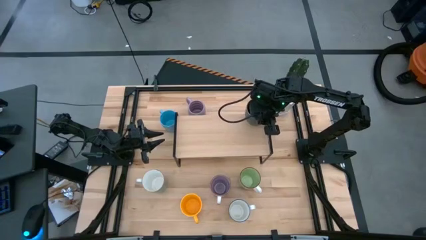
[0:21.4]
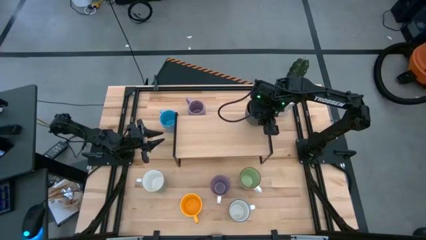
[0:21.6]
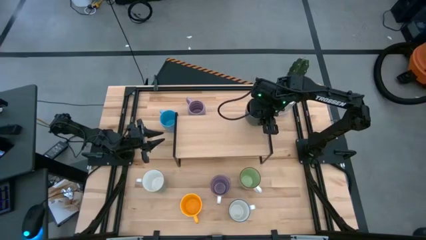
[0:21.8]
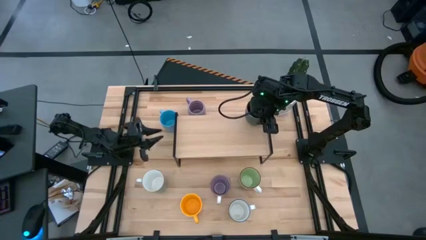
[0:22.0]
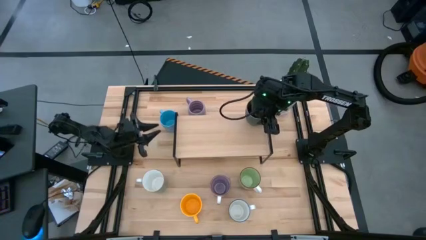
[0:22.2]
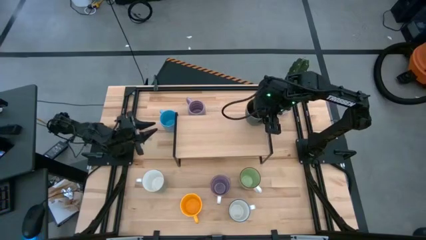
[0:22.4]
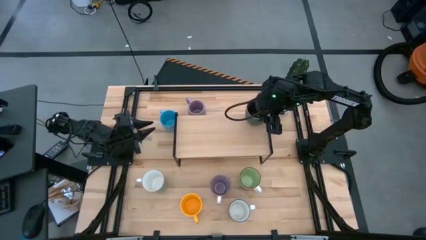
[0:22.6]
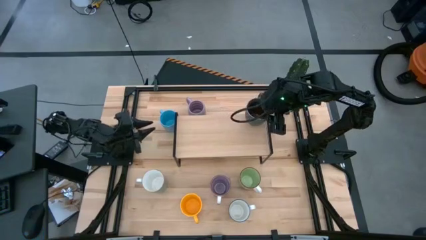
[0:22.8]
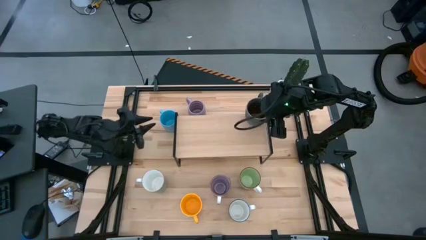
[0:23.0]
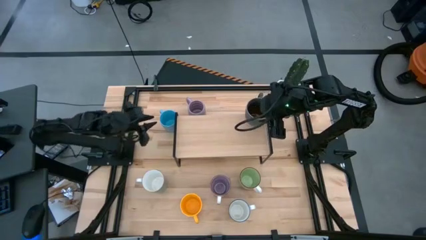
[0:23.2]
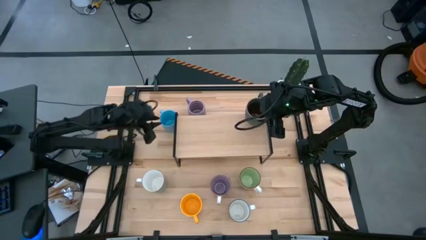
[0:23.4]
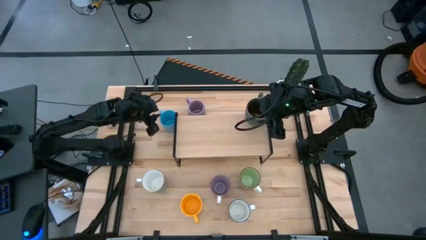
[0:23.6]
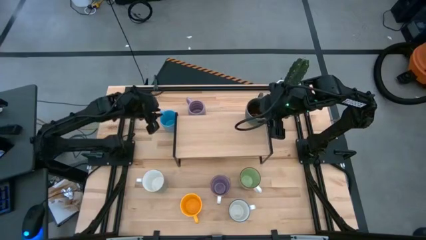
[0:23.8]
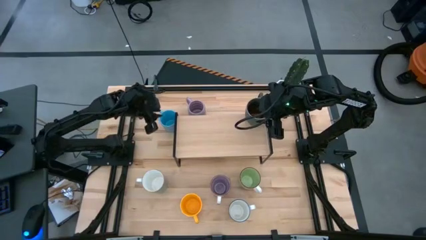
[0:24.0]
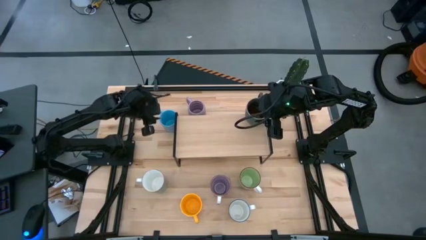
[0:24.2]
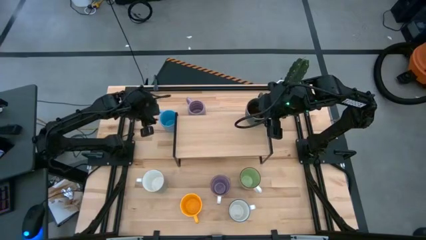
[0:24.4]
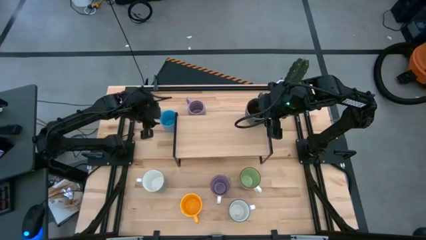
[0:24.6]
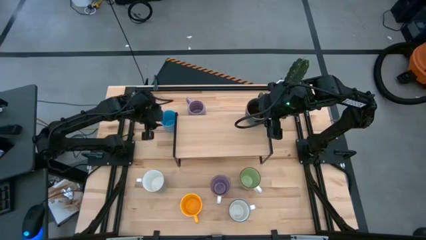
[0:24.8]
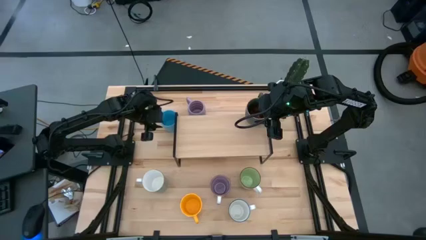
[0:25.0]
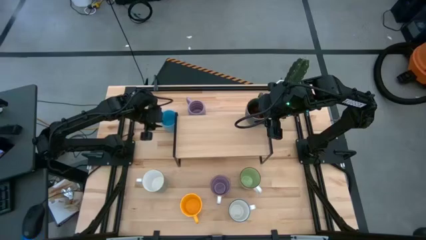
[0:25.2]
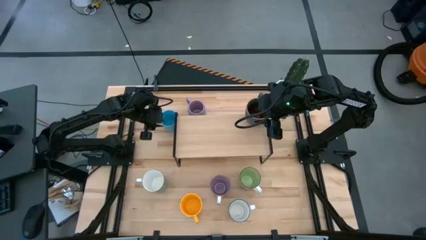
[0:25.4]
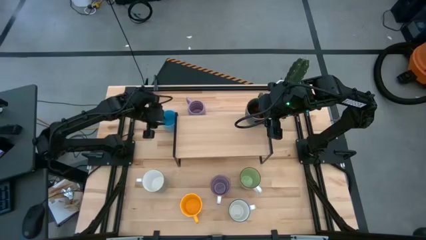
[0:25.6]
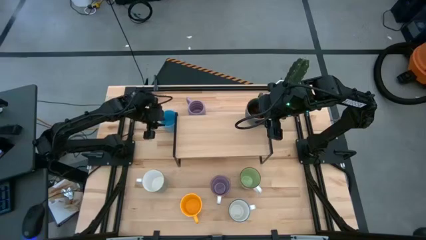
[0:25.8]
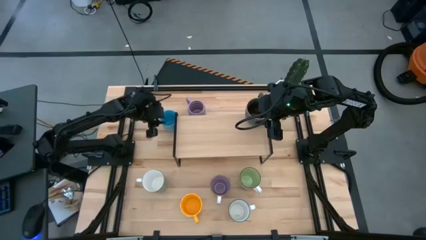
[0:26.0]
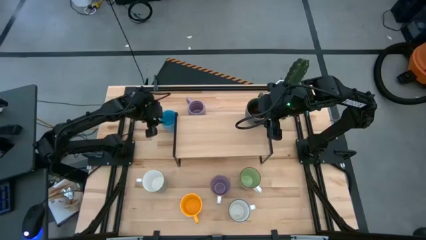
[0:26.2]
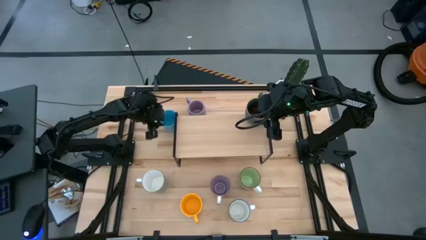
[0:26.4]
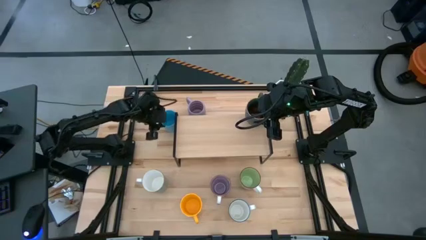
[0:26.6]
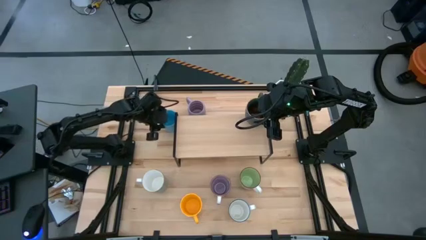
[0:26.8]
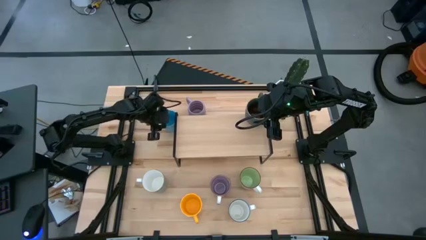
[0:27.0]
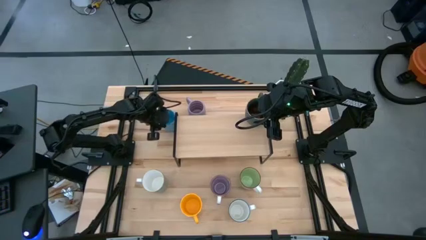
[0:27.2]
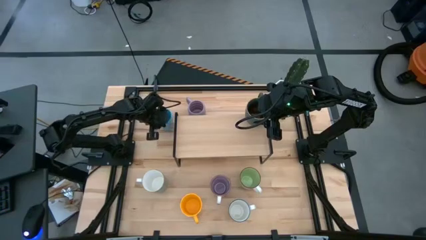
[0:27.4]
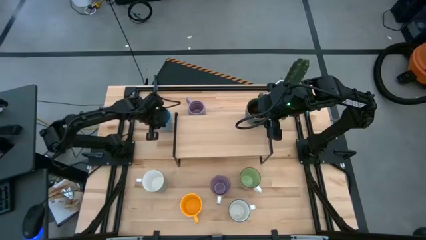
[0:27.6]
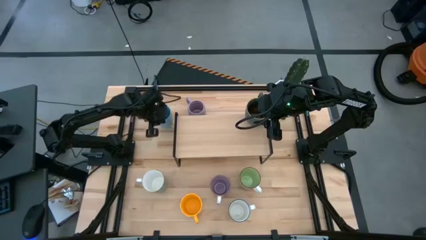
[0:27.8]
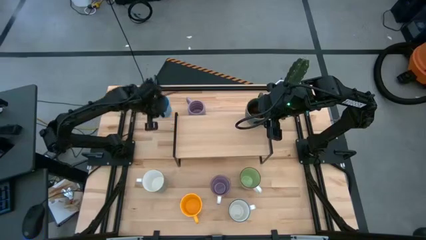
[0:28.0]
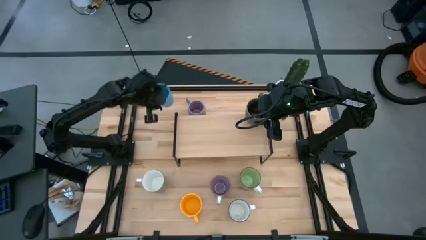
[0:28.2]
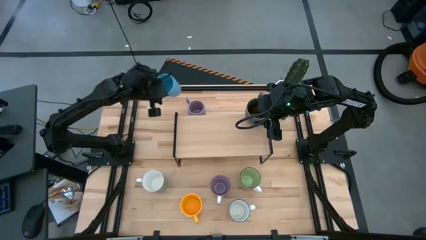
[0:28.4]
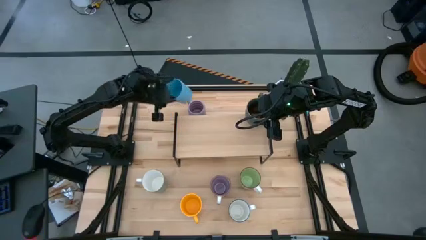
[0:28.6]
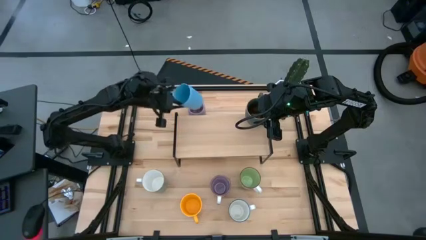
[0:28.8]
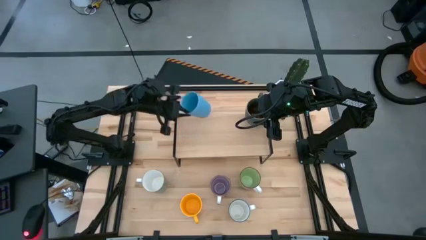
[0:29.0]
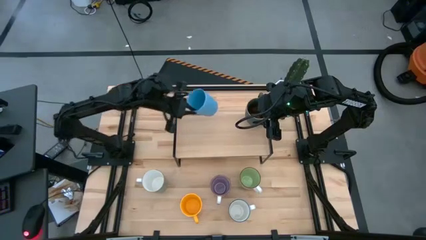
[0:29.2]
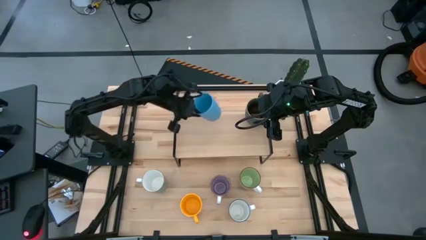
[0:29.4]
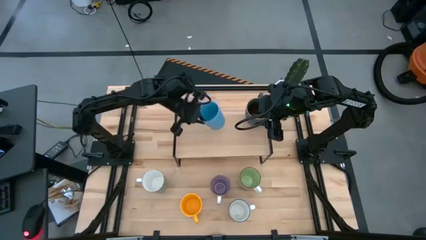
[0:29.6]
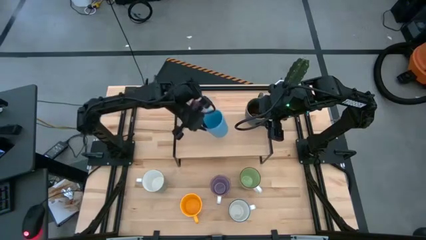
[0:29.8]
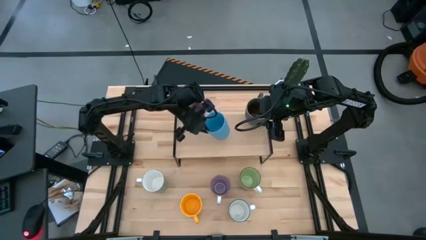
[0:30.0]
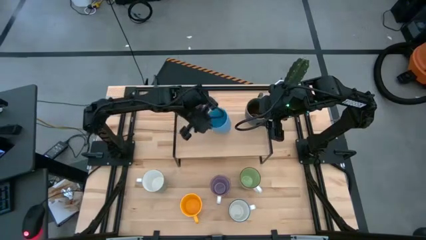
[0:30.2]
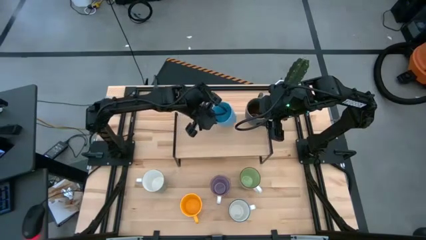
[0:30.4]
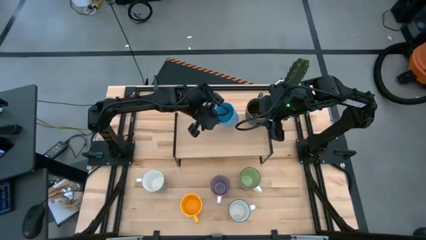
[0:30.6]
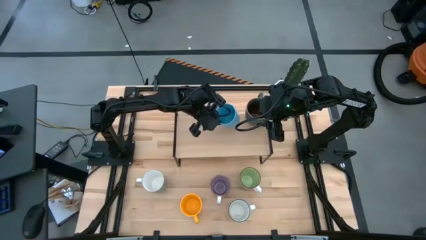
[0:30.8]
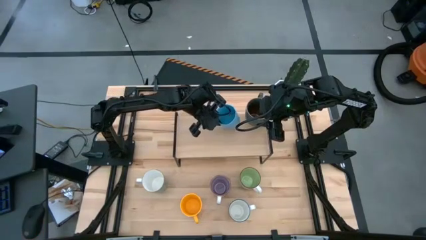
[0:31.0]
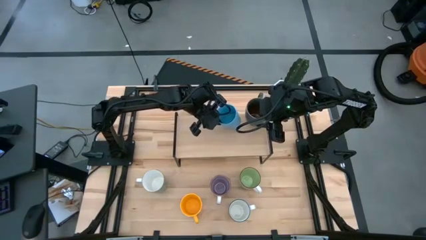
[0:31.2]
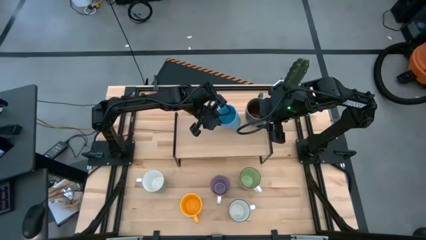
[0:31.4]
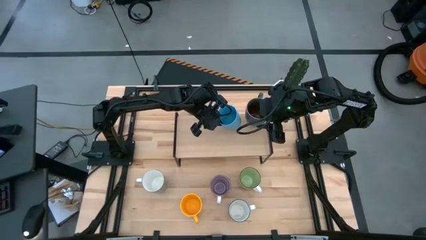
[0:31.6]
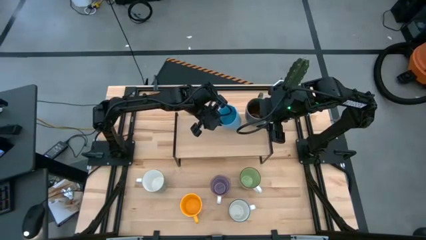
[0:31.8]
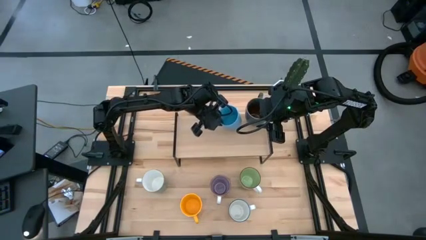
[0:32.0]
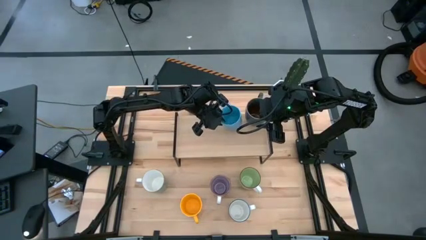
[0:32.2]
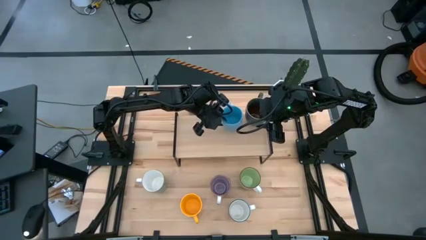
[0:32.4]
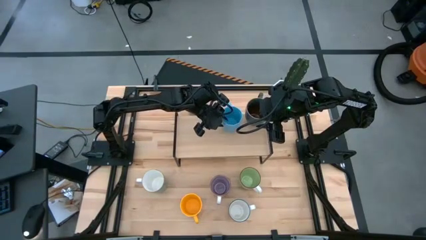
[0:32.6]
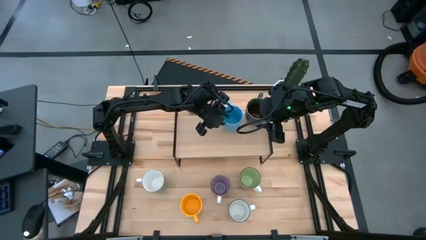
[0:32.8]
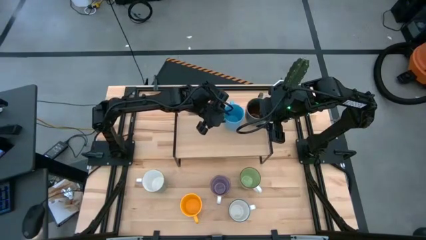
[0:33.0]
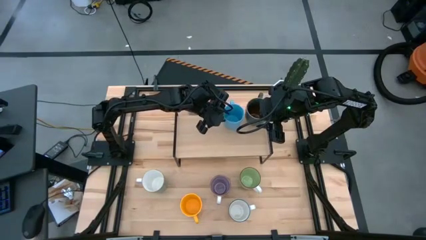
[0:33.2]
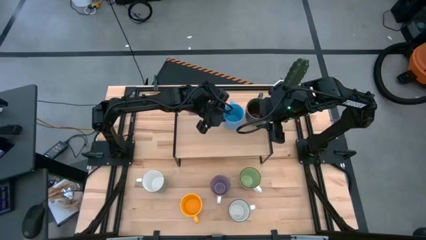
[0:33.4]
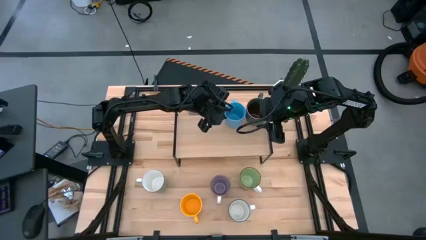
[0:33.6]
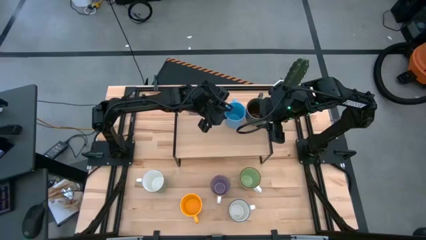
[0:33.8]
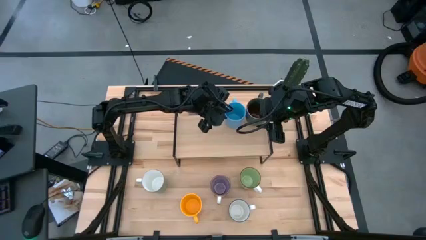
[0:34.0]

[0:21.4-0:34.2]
Task: Place coffee mugs
Put the light blue mug on the shelf
